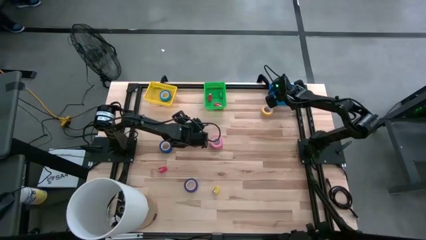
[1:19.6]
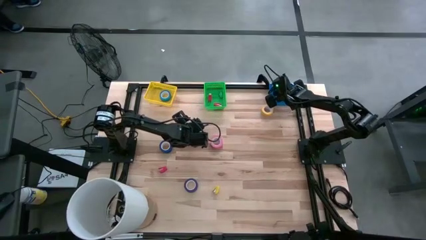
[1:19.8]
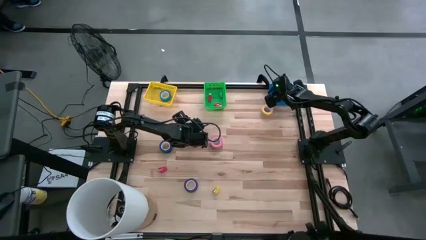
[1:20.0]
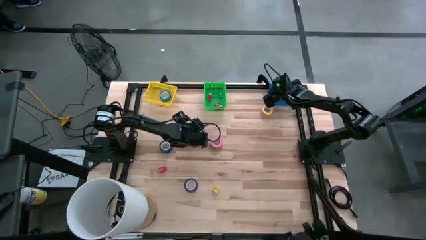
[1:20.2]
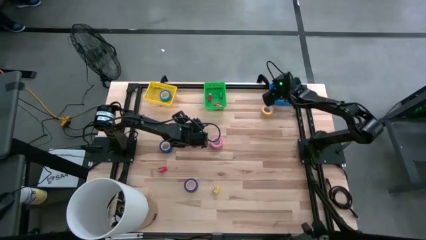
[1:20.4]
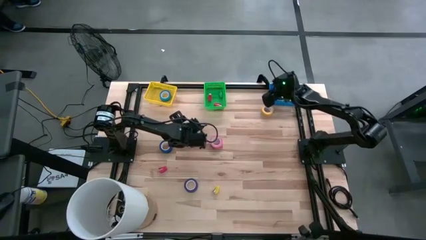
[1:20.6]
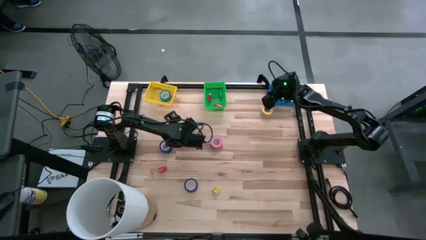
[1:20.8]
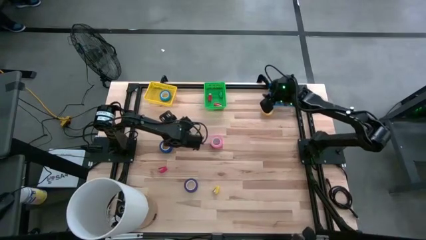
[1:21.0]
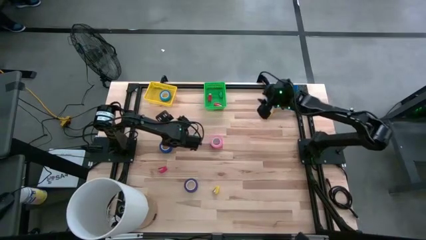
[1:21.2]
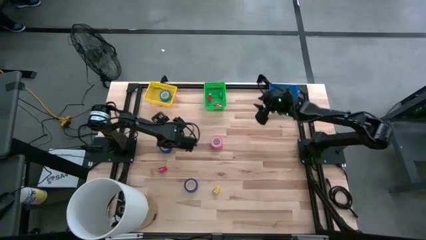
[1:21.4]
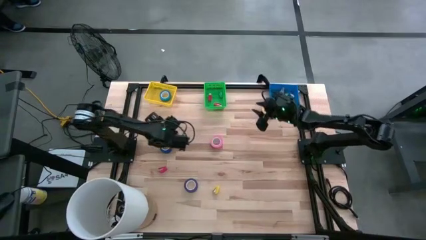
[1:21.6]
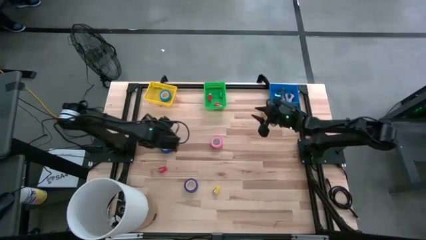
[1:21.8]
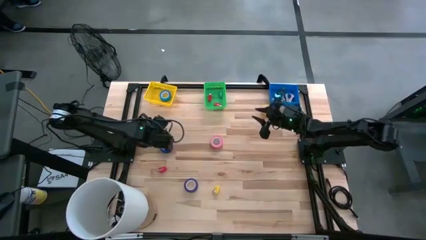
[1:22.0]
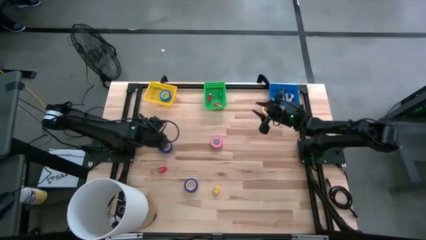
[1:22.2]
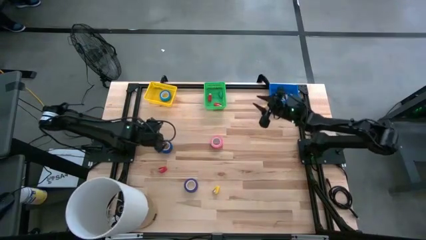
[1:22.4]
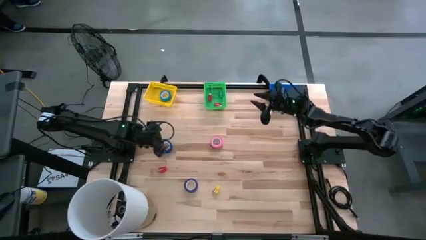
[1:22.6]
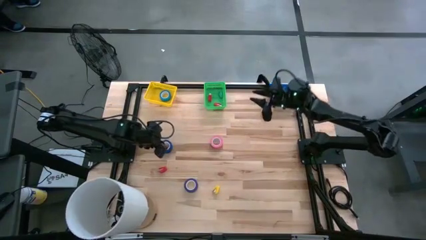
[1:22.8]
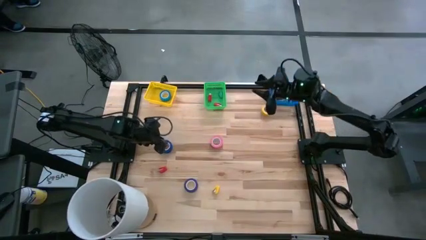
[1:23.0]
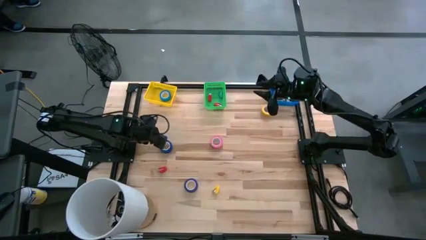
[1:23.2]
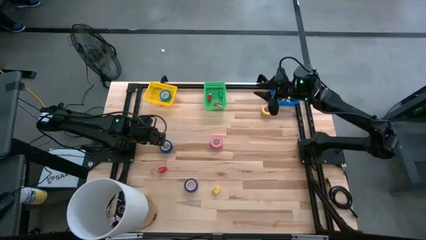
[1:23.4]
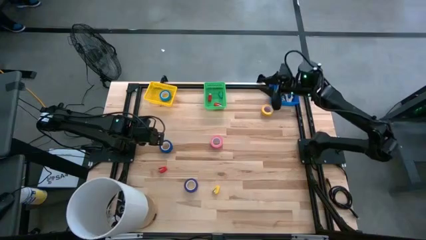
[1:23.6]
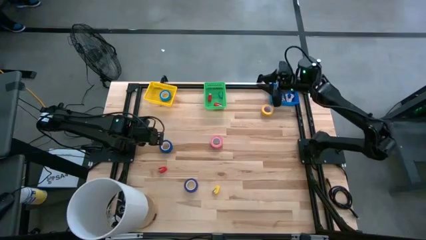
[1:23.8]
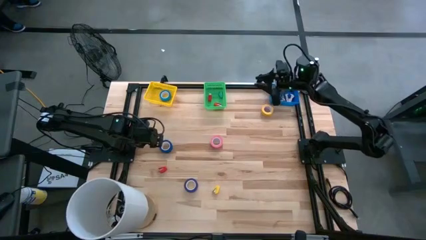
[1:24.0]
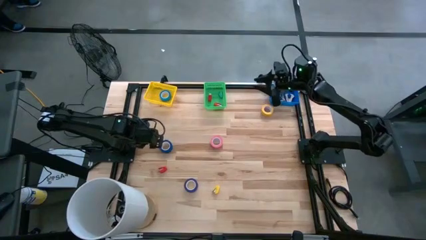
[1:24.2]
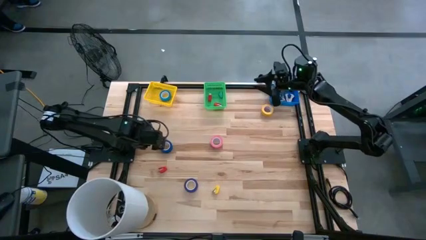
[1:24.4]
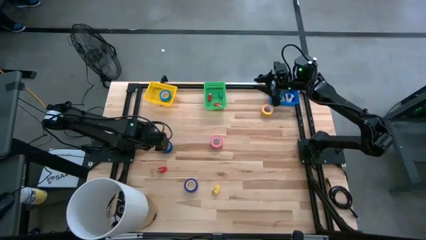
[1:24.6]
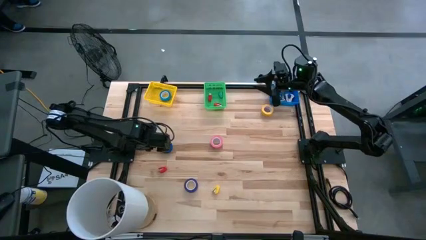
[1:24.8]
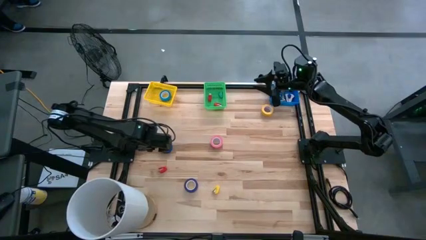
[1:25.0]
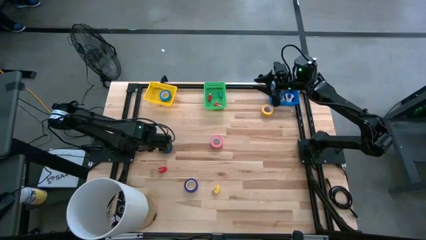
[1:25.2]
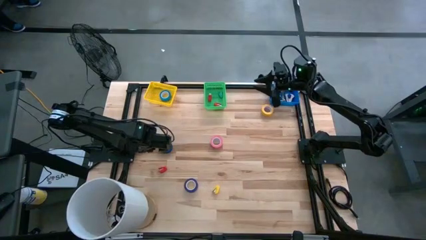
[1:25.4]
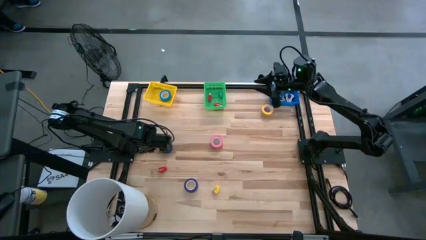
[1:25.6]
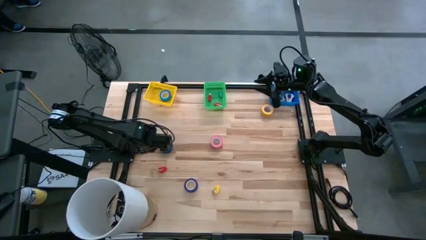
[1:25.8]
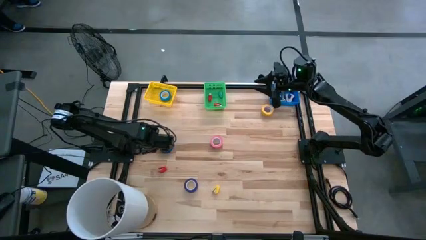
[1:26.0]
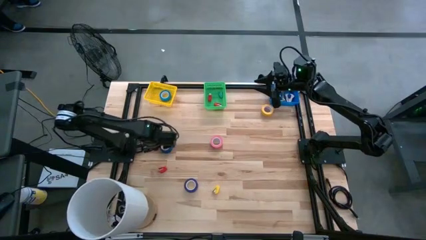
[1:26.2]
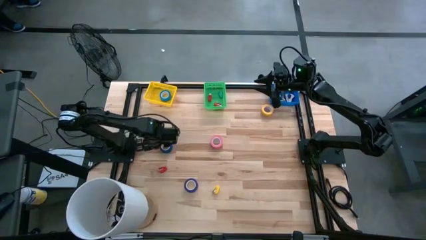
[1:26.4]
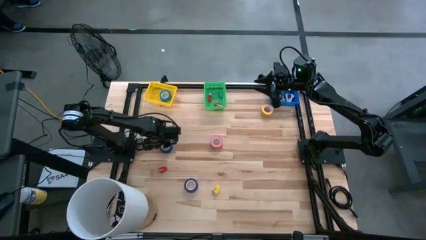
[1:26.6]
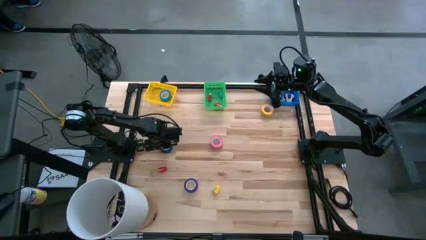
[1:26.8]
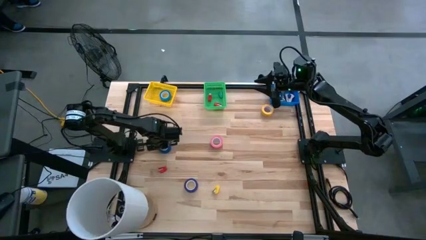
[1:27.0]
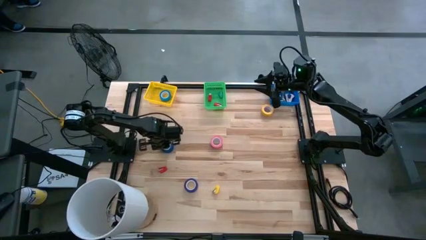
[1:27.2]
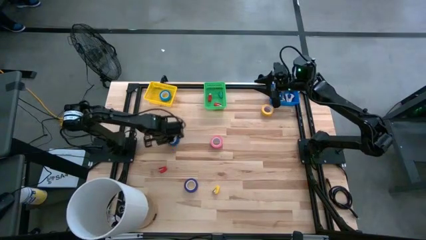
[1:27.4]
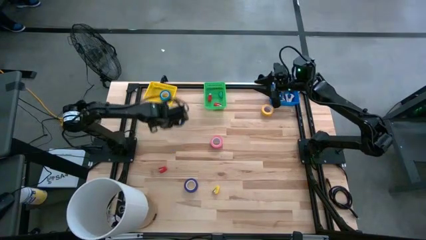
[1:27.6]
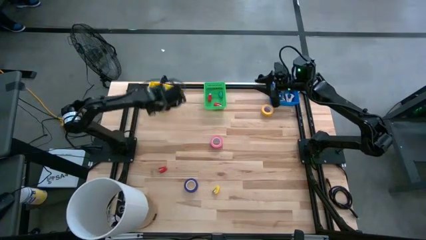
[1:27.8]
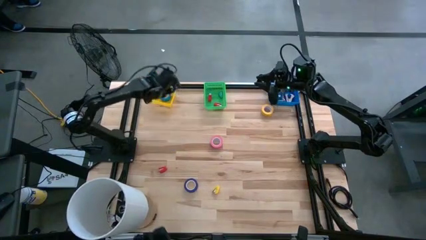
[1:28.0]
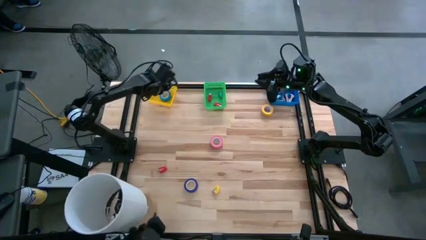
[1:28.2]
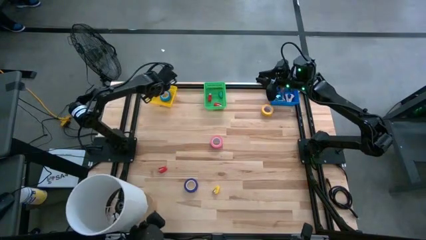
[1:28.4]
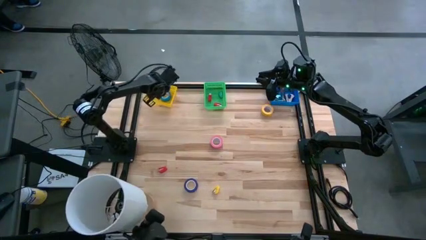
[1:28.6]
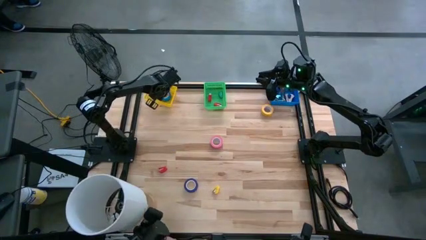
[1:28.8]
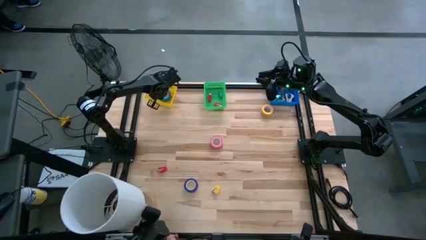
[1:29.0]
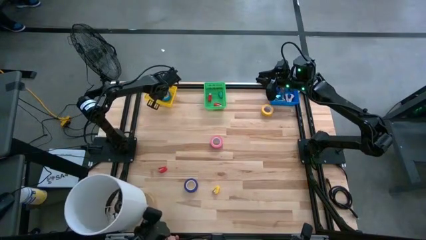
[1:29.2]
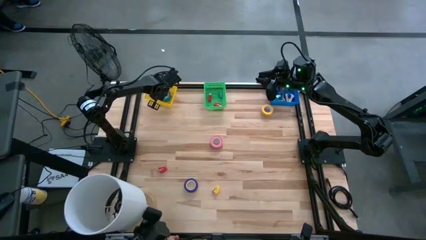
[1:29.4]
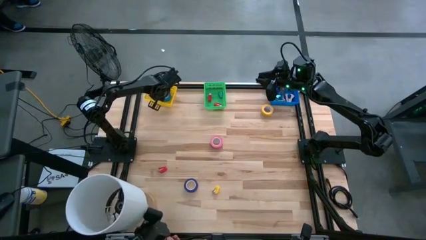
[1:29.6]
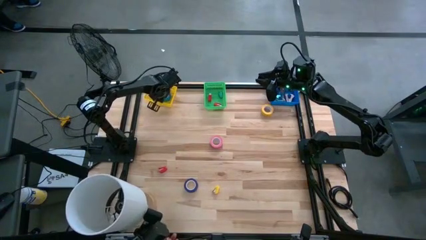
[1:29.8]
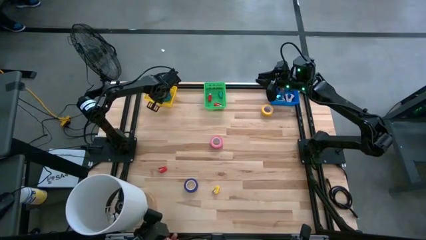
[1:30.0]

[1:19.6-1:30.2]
Task: Pick and place Stapler, Stapler remover, tape
Put the blue tape into the yellow basket

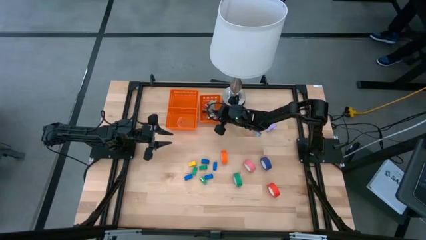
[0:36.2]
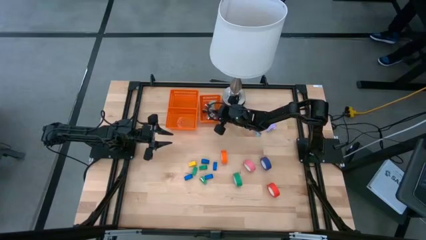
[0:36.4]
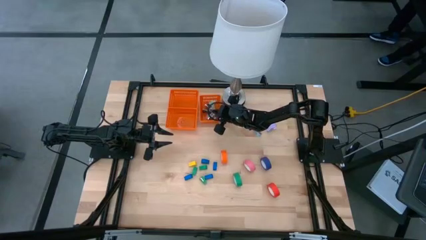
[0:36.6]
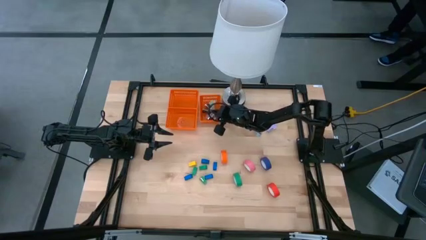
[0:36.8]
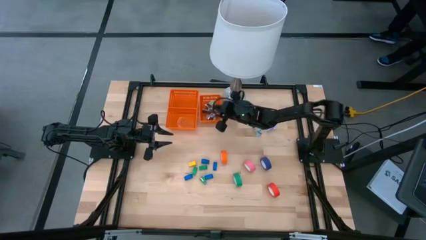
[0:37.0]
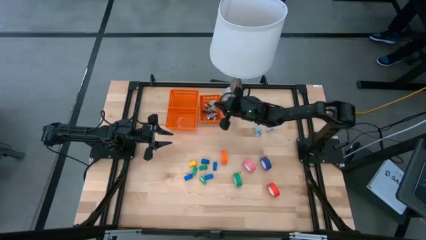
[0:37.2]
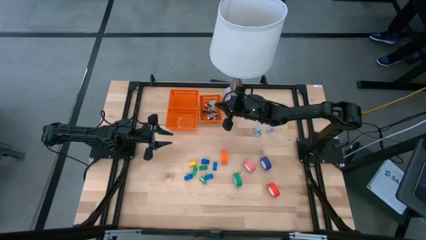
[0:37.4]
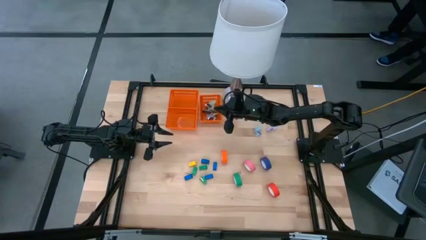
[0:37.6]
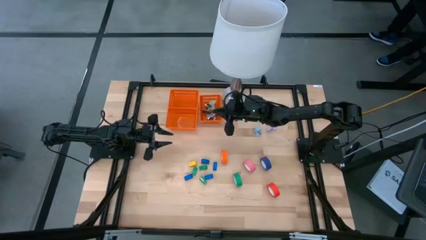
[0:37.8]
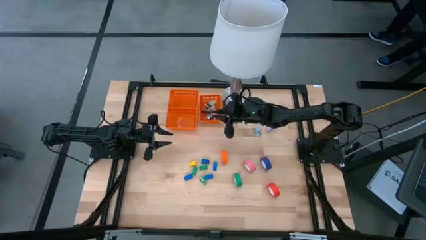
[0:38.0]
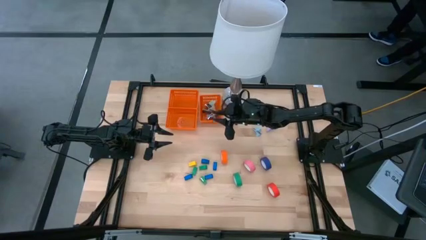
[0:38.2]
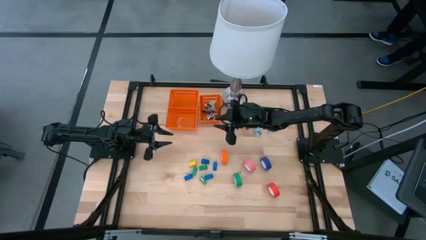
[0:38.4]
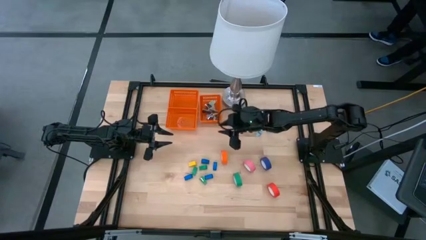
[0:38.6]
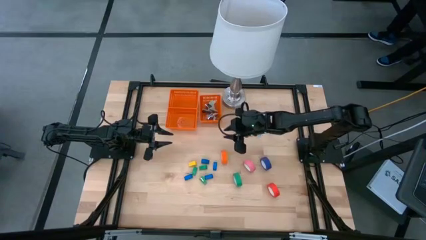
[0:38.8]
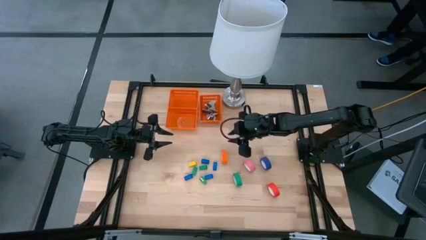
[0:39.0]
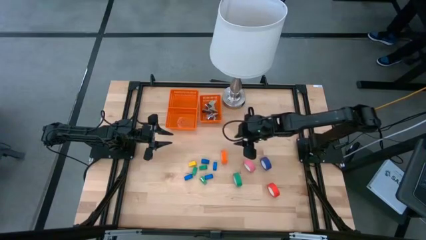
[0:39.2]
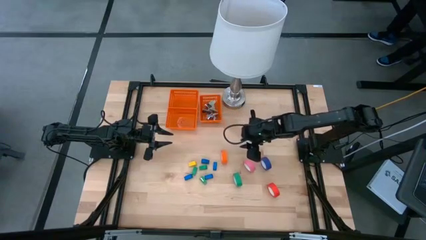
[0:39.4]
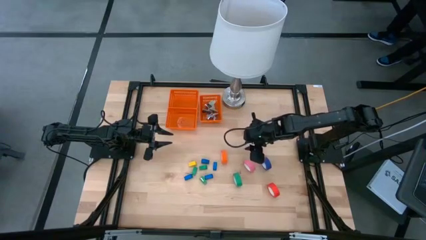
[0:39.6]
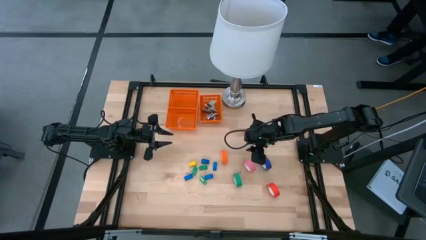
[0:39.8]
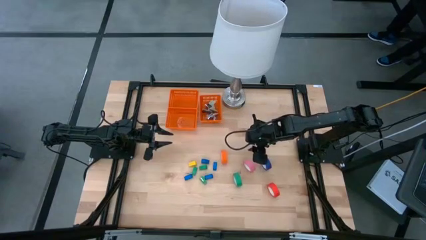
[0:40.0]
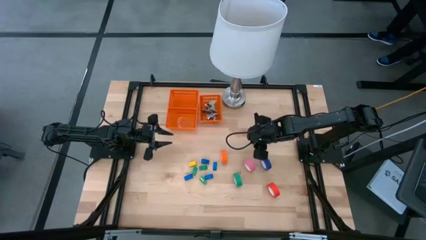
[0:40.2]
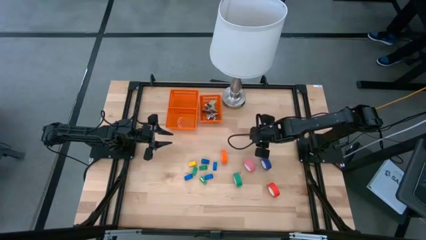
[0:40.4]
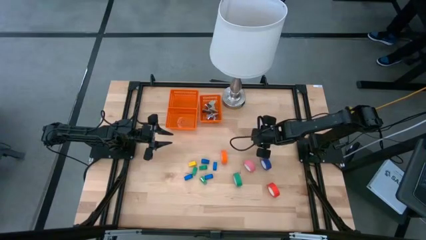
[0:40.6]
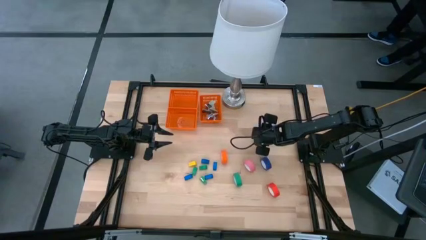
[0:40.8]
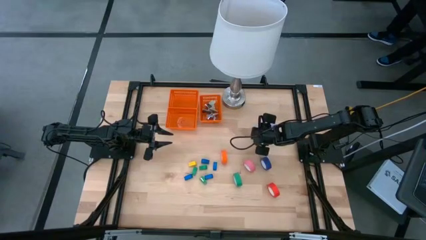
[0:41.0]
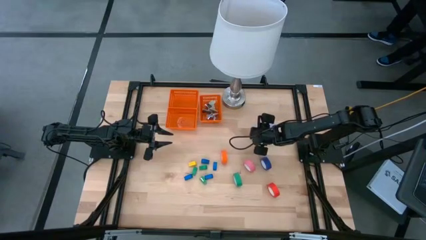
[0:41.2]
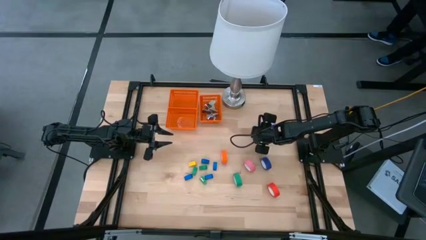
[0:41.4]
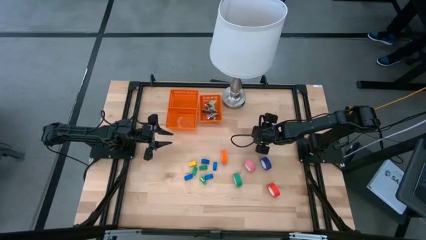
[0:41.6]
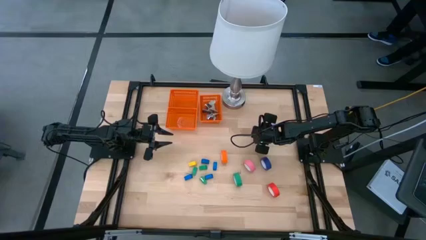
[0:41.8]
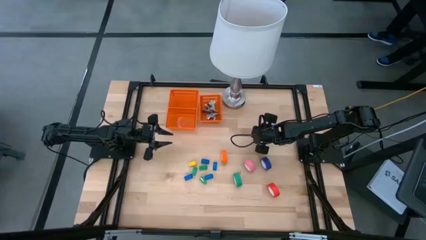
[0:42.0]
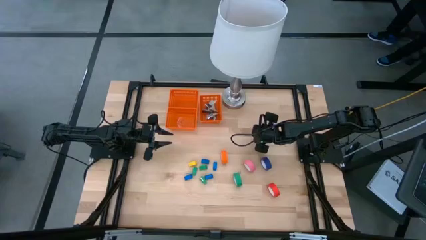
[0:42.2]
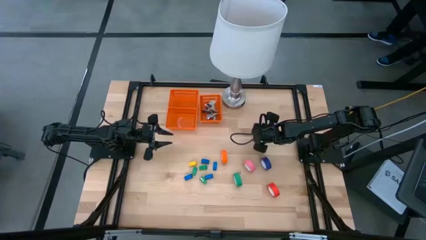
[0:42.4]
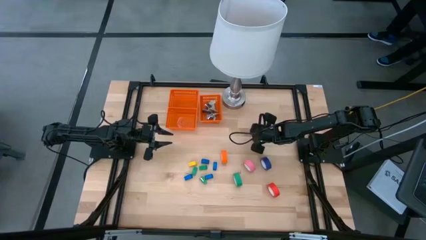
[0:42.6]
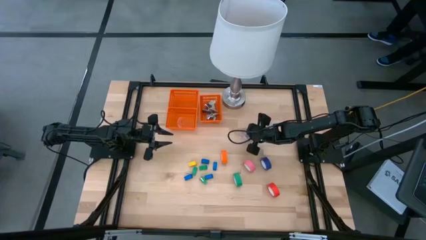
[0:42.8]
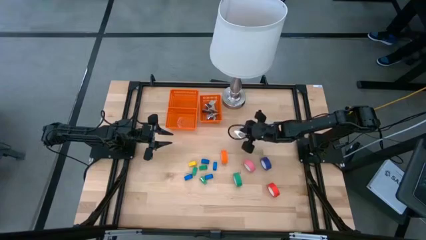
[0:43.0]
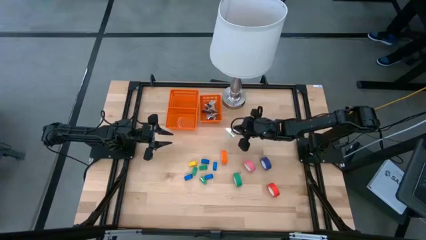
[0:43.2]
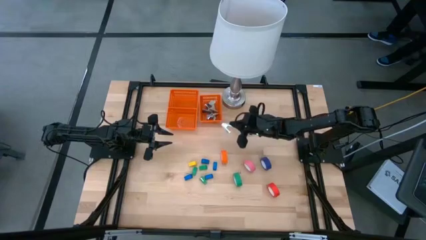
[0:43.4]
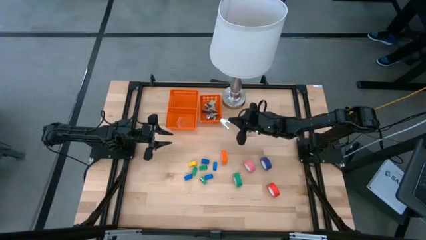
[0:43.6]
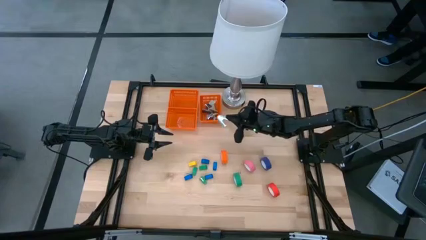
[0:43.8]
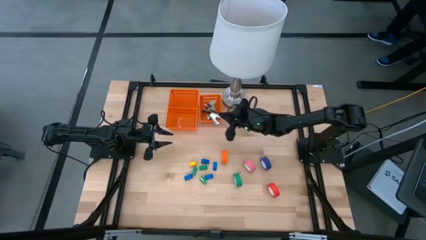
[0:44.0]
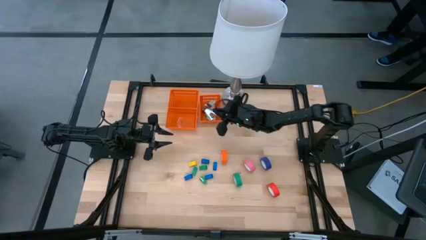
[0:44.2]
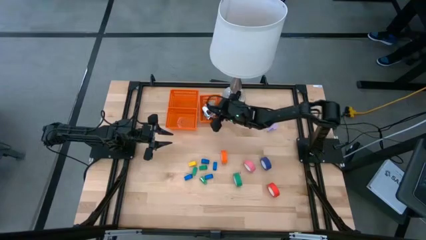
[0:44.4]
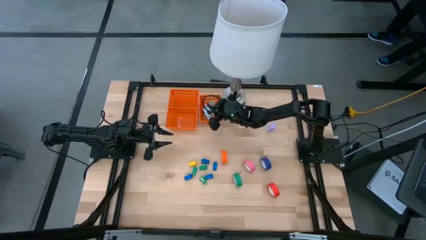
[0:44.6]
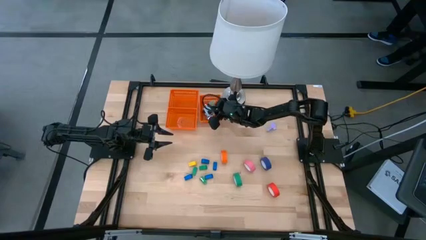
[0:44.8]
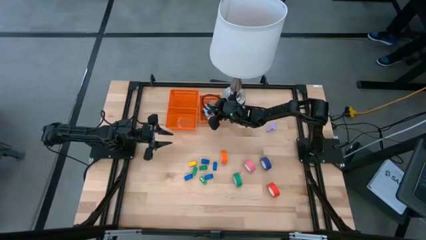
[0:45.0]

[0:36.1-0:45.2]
Task: Pick and place Stapler, Stapler remover, tape
Put the light blue staple remover into the right orange basket
